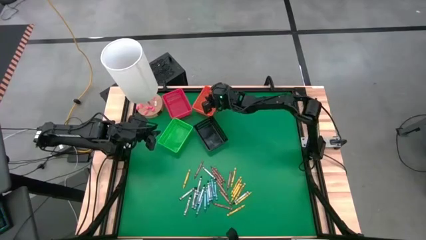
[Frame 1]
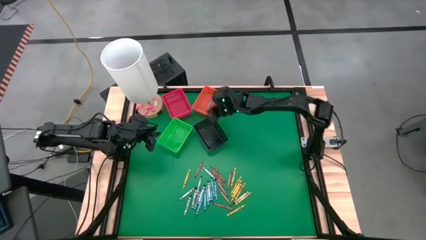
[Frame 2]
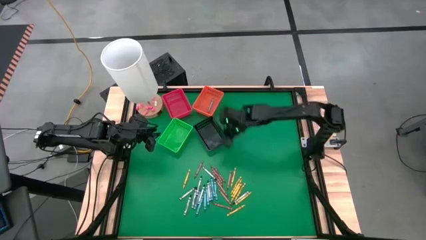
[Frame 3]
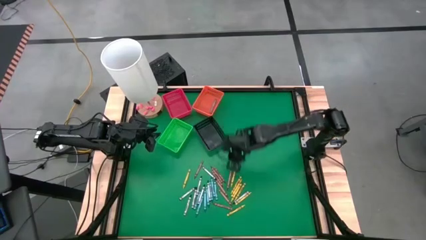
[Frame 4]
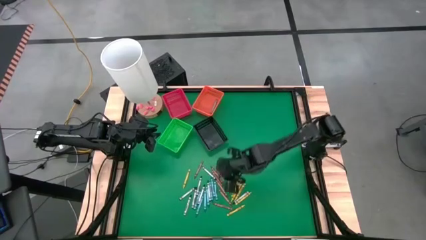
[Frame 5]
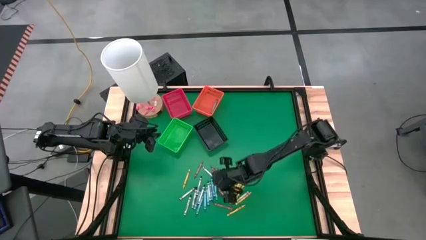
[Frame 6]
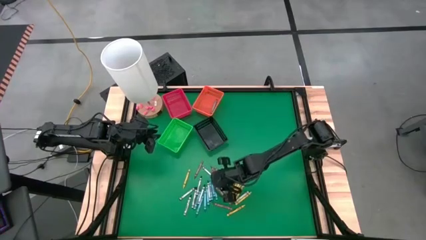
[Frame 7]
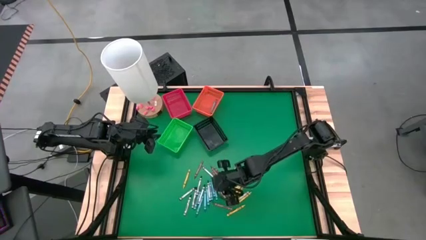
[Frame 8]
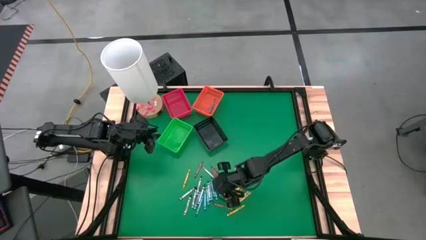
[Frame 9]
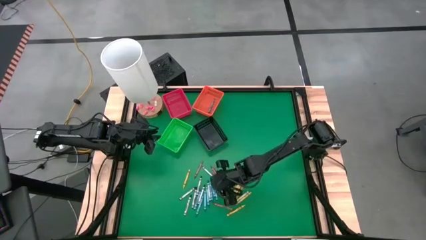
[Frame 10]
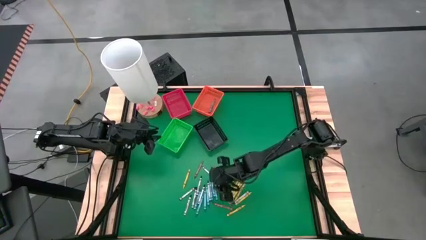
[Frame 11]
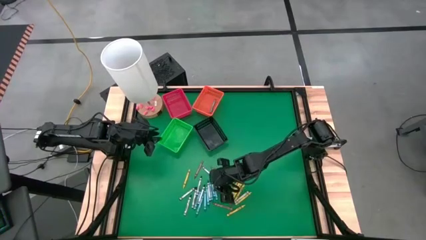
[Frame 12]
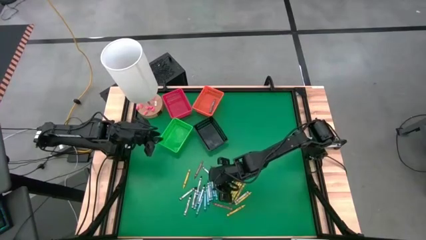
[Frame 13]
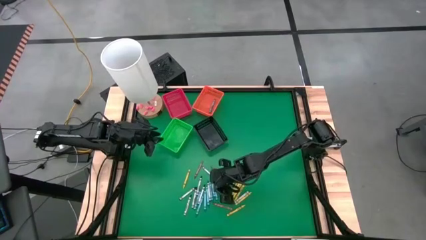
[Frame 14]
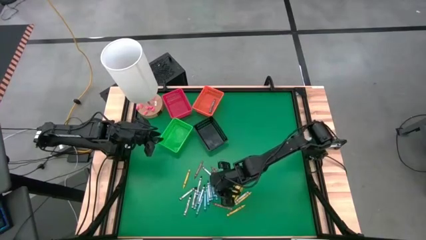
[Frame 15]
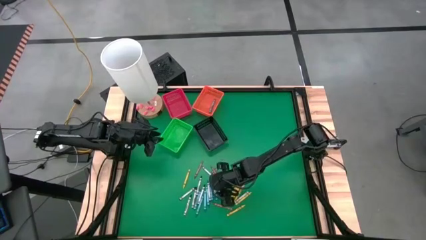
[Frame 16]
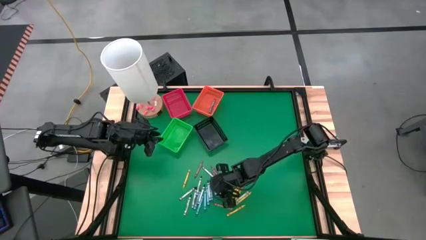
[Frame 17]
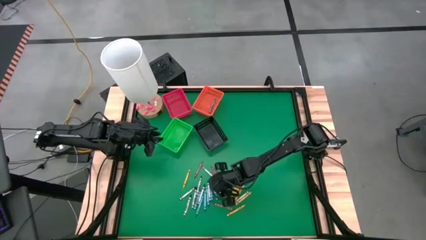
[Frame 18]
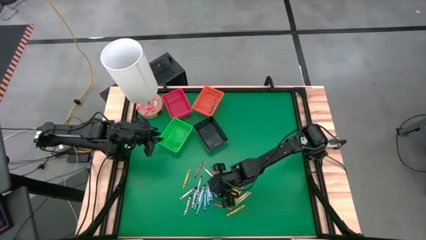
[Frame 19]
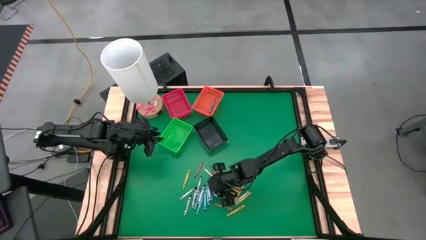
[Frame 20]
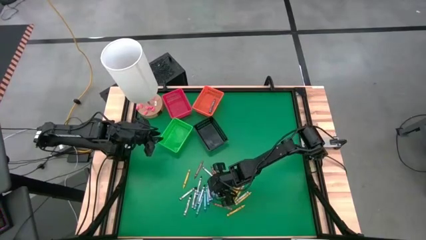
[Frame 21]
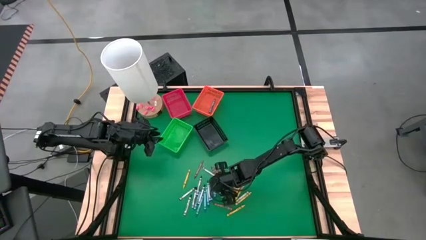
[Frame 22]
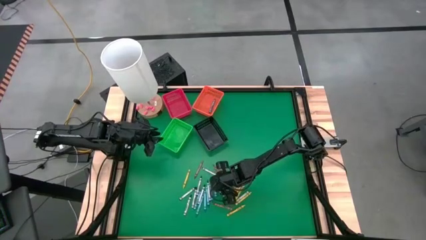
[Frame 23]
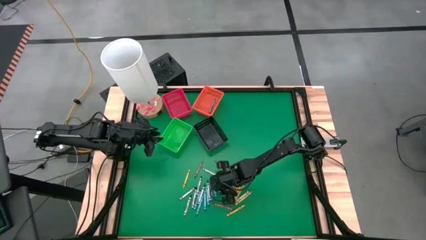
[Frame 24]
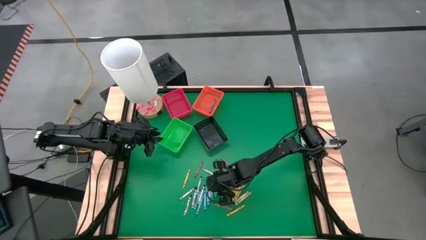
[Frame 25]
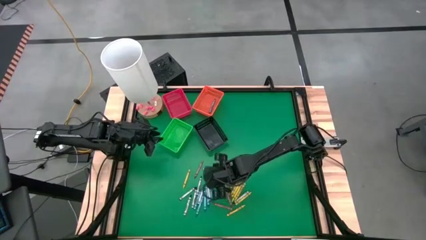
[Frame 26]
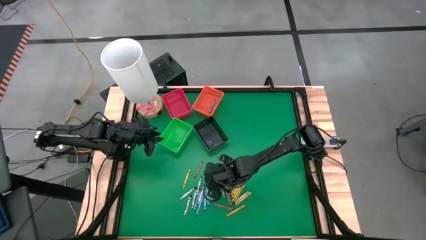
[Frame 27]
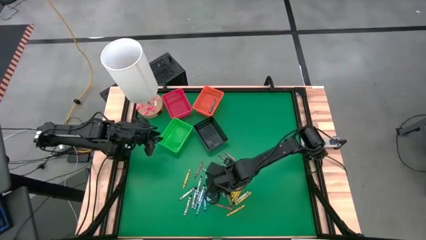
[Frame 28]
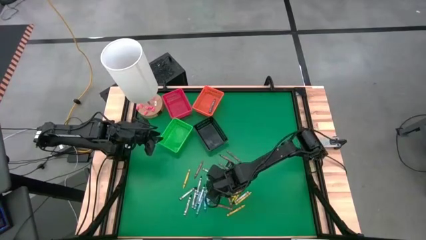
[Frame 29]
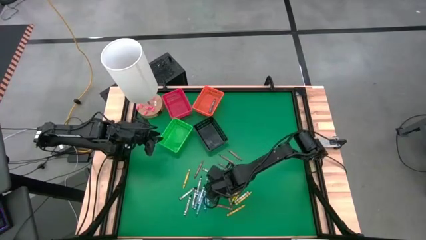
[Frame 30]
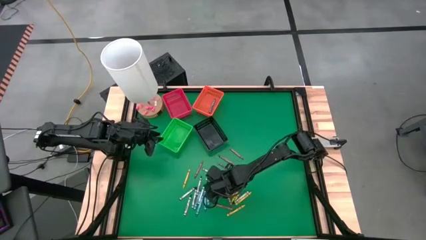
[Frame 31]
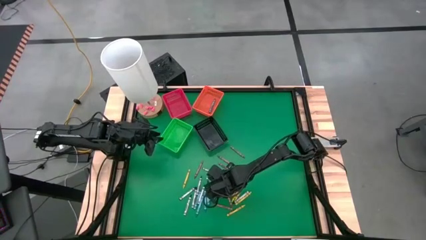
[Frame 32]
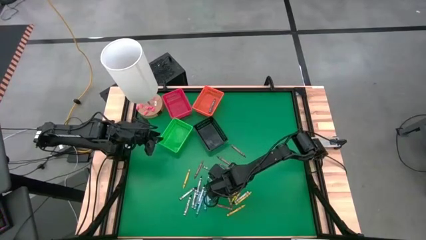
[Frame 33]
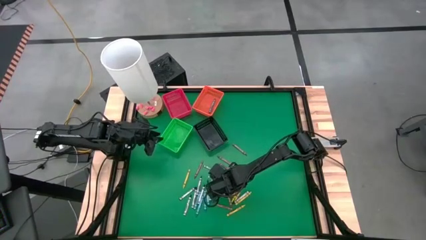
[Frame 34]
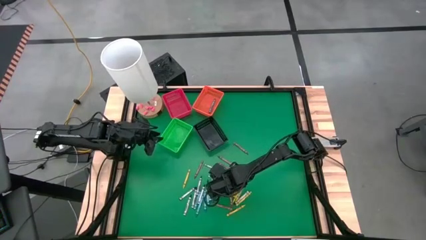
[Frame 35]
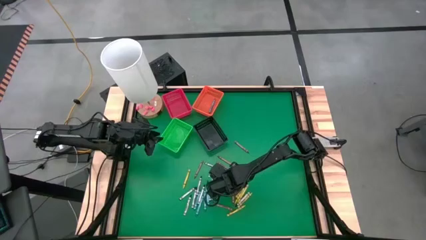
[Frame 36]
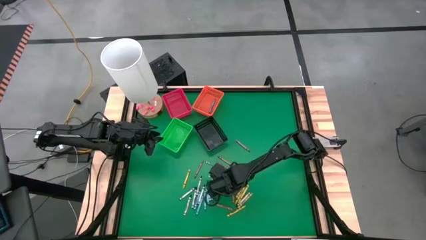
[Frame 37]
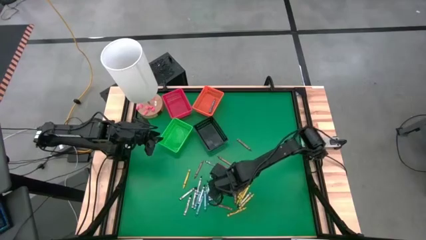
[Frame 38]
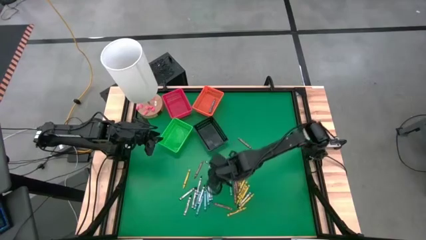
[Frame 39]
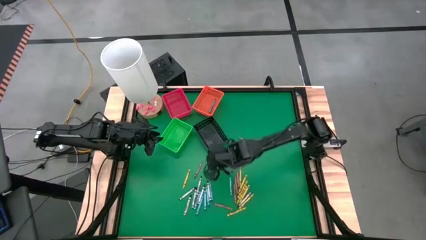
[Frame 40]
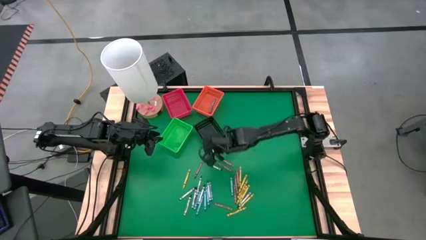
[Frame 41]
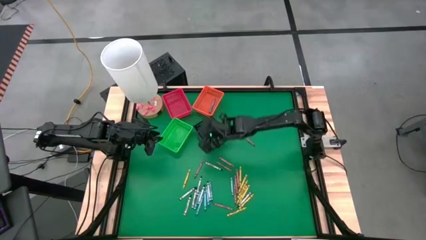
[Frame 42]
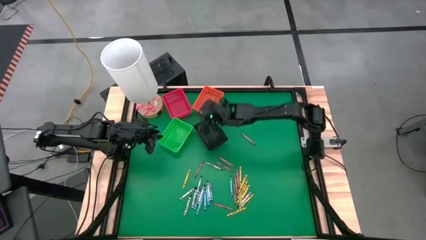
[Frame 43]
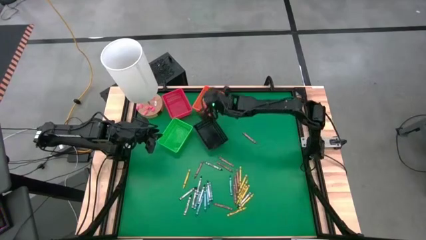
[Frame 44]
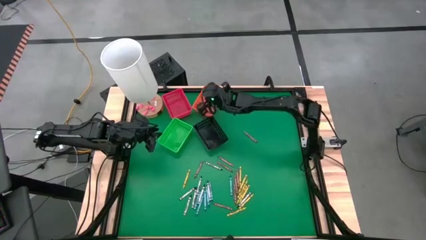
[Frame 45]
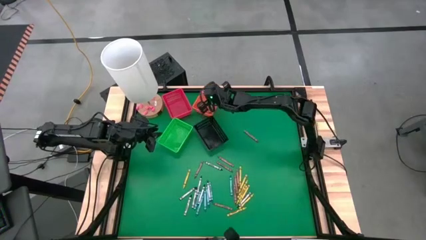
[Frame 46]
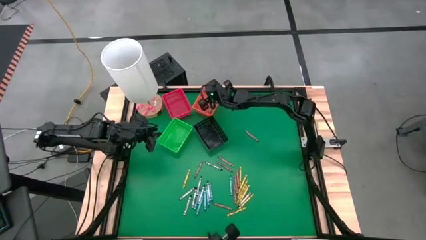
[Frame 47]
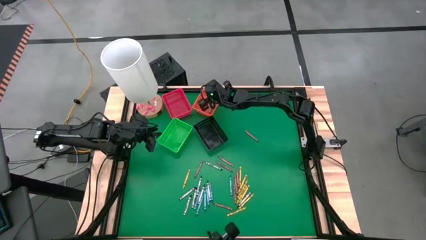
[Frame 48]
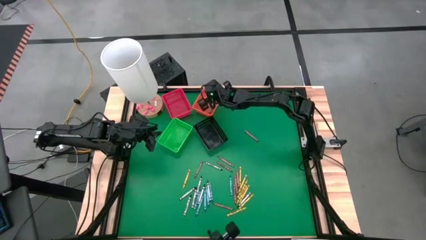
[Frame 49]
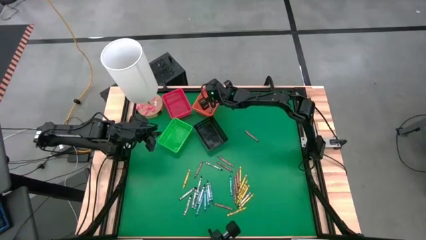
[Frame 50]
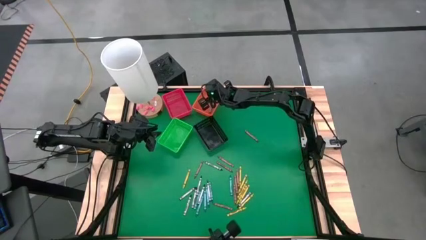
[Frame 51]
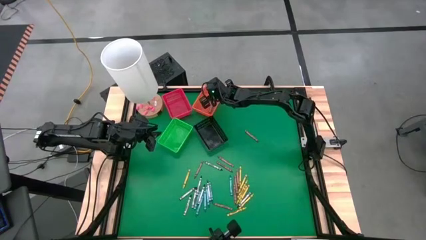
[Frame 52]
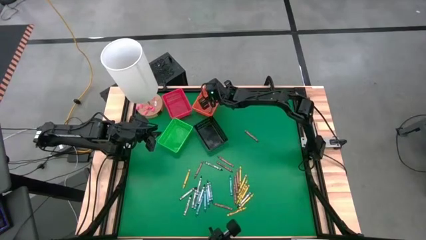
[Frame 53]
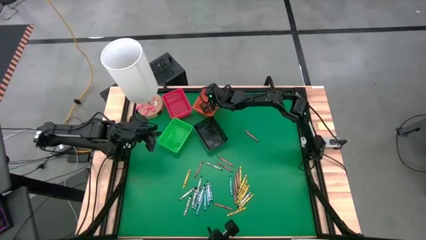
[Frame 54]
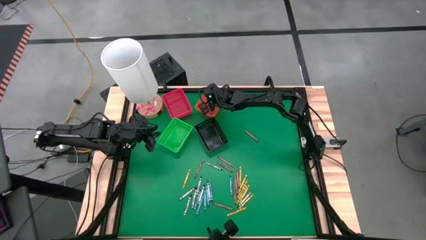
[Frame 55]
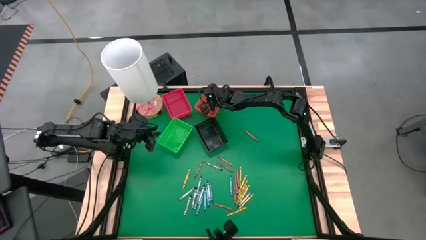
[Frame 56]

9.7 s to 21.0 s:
Task: Sort crayons
Put the blue crayon into the orange bin

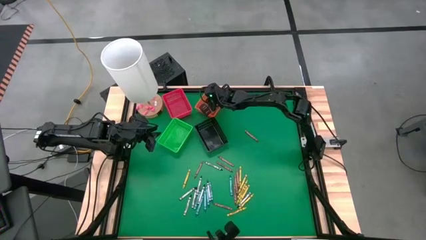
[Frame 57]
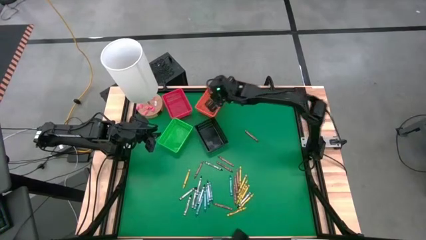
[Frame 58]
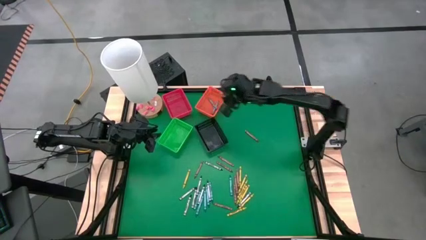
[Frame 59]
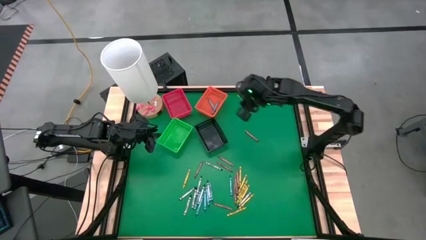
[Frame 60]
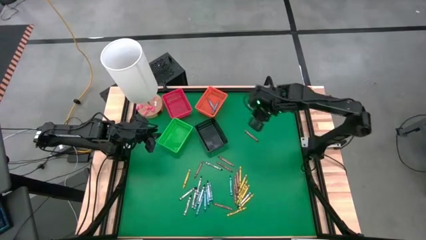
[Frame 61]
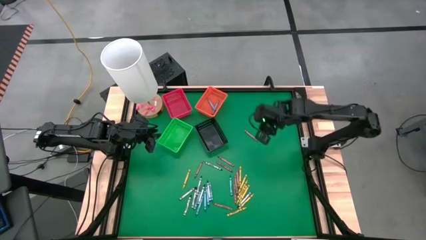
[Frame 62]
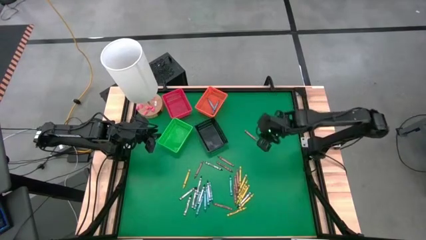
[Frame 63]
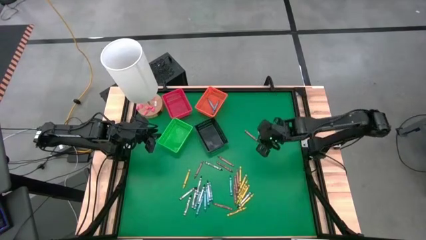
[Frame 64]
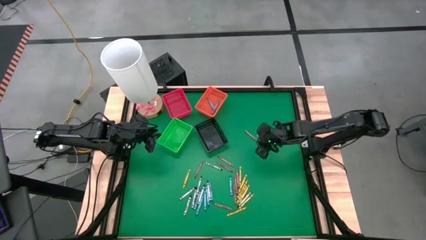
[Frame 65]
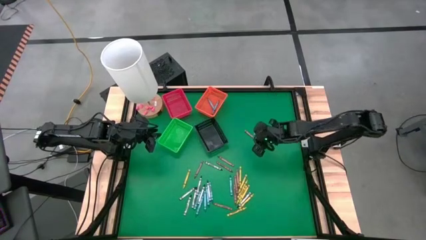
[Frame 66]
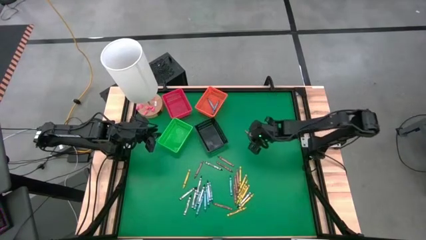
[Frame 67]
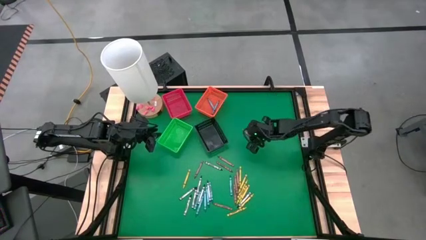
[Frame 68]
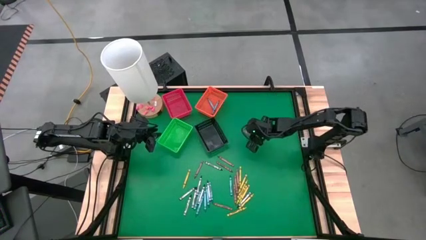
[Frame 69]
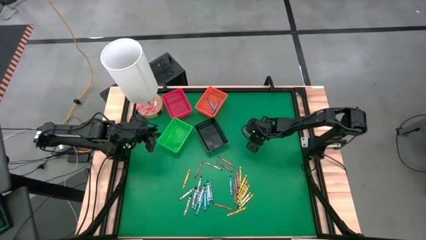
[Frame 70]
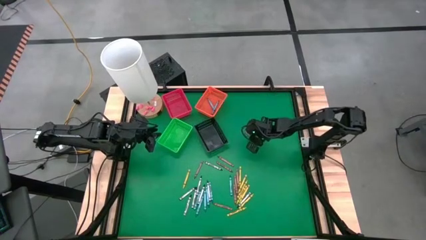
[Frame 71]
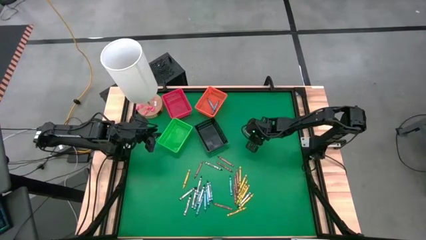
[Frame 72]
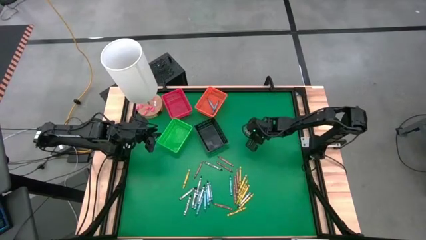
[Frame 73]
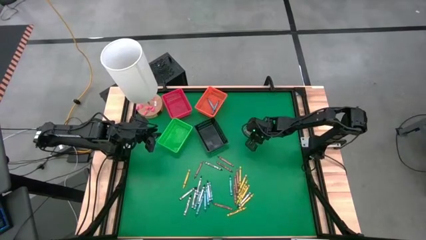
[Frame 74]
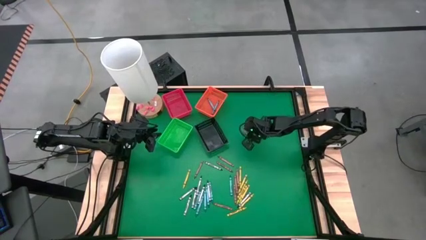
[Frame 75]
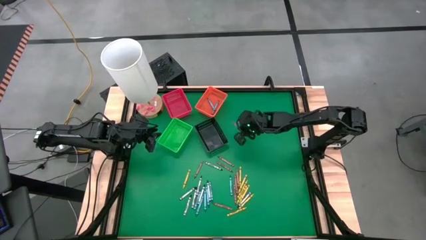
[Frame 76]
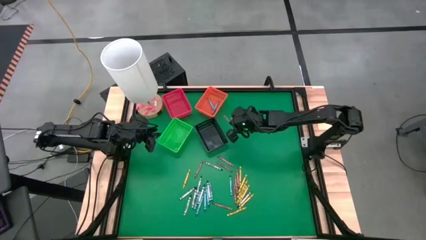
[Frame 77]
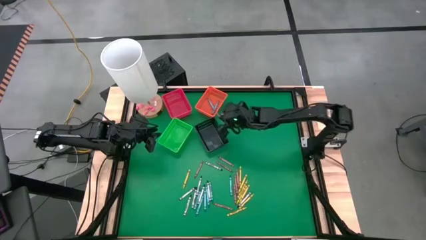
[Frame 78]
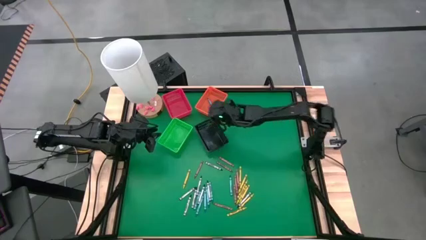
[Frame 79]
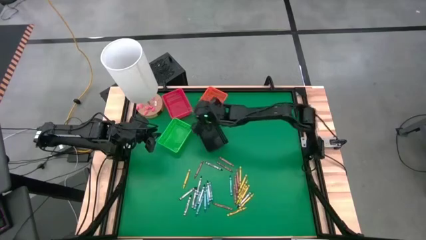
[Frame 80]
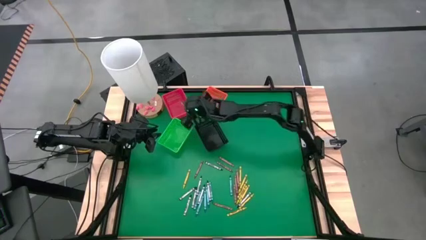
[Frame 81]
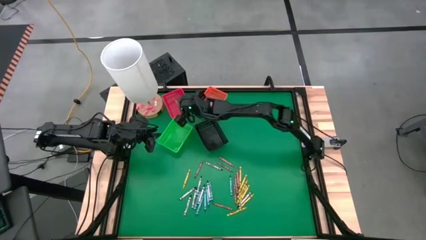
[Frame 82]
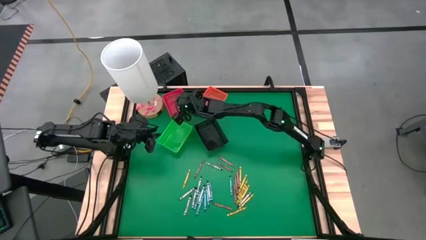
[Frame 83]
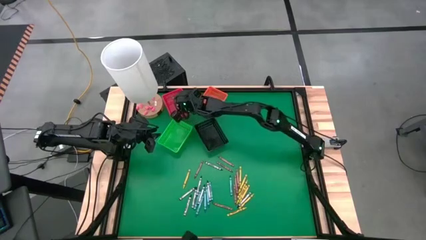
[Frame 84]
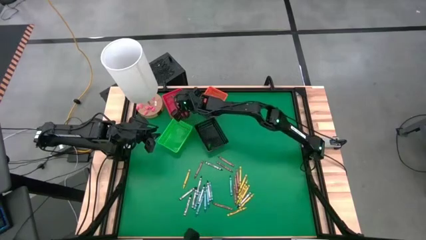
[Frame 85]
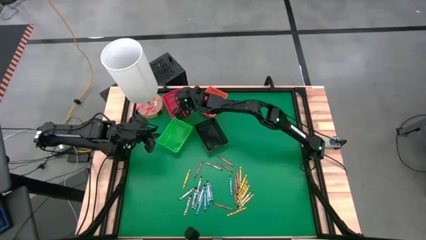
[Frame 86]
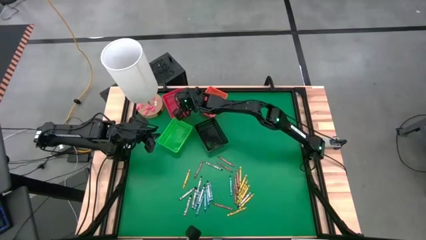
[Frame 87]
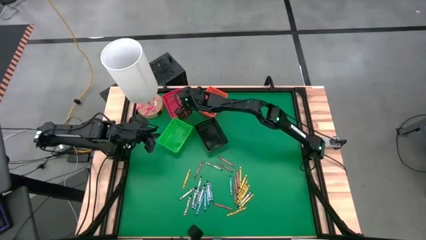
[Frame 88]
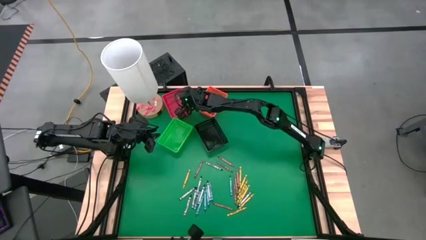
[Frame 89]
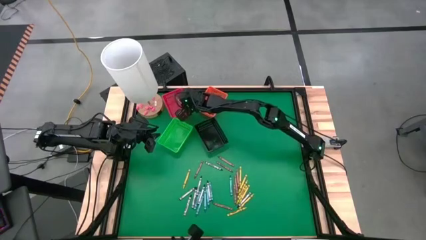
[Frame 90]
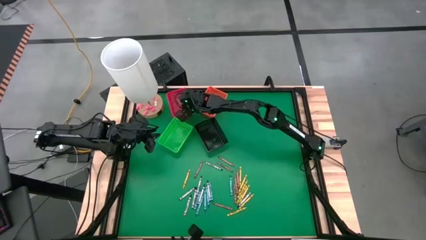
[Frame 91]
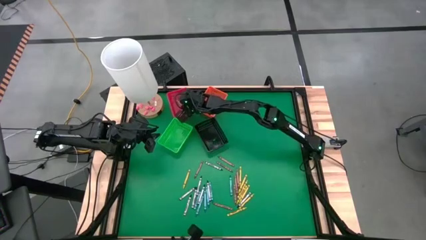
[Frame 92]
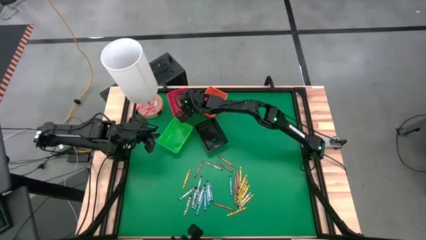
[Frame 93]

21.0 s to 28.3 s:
Put the brown crayon into the red bin
